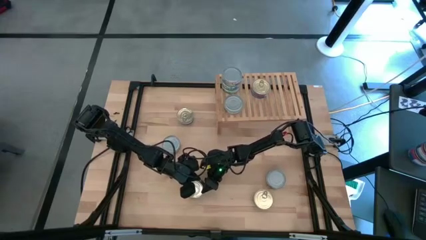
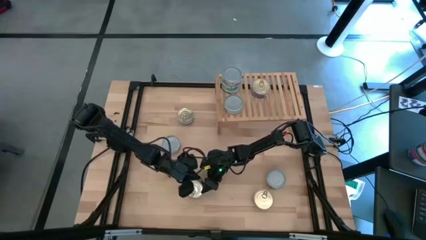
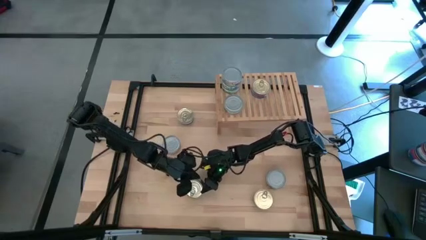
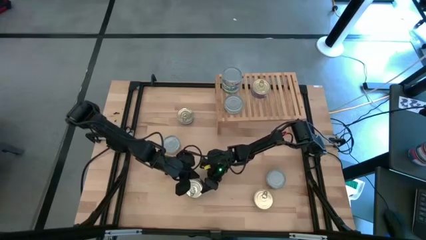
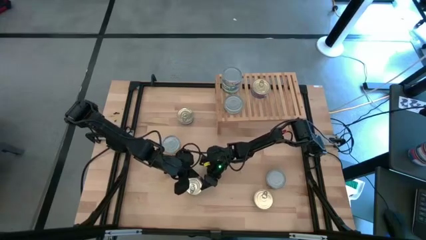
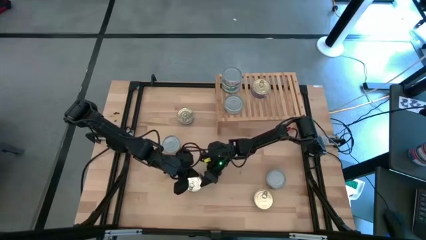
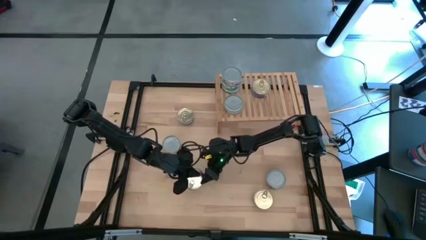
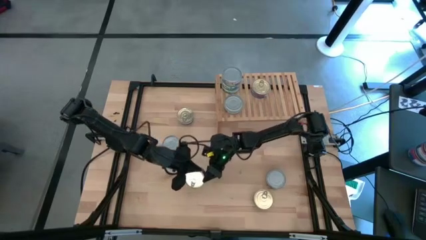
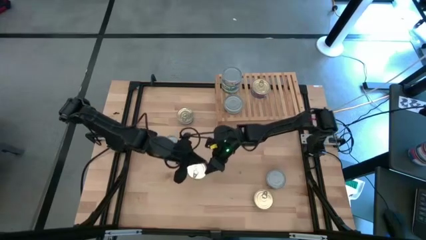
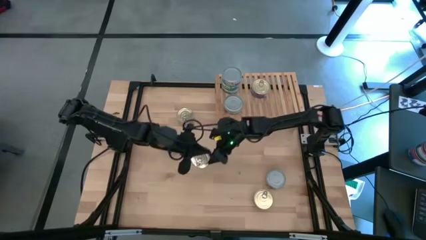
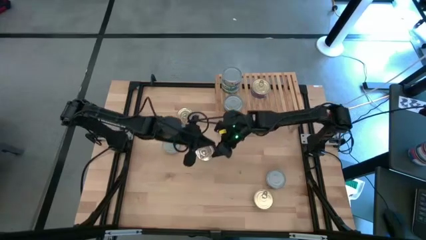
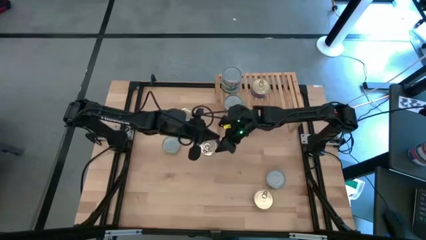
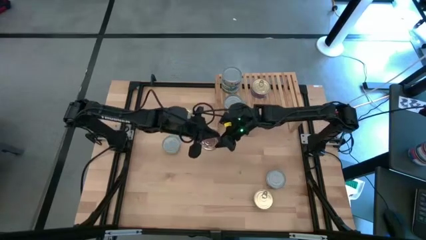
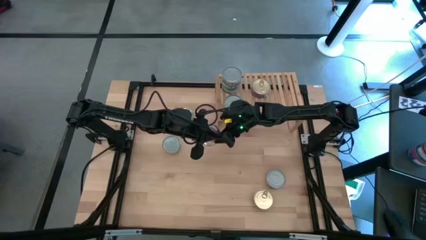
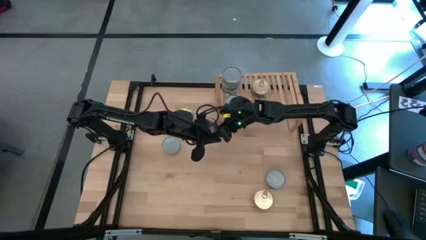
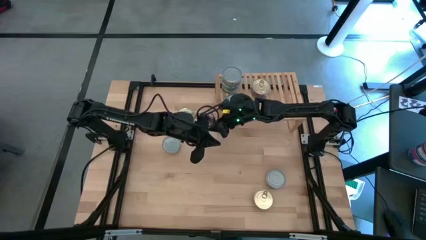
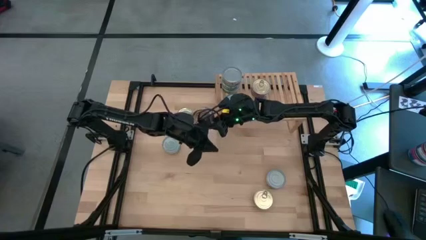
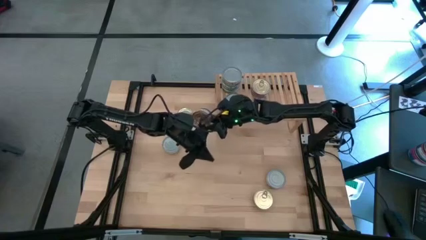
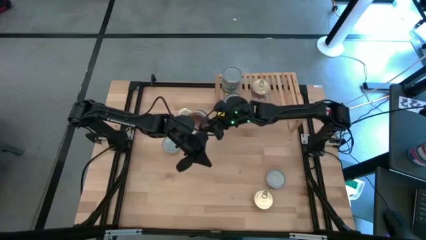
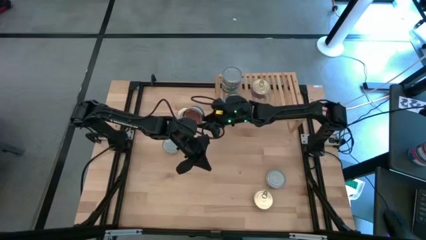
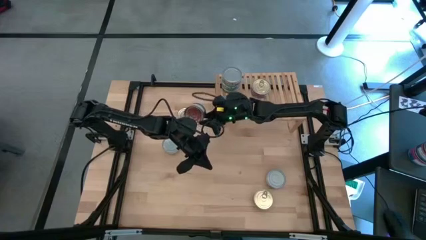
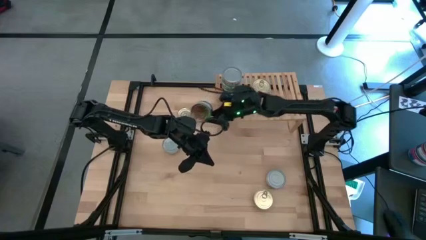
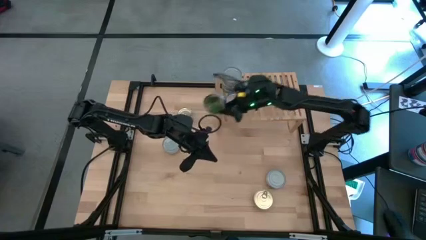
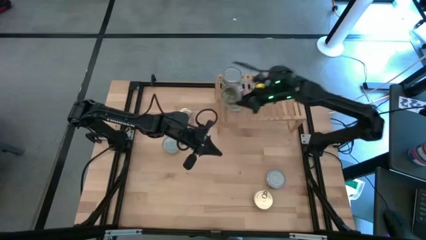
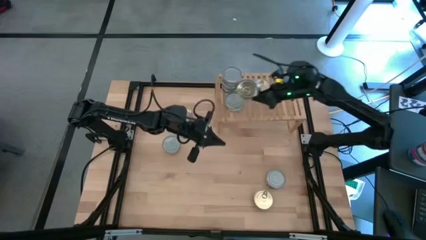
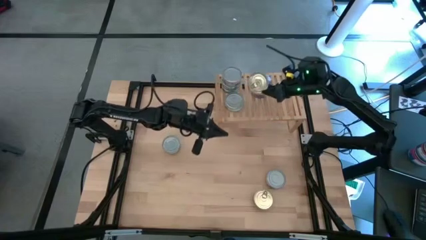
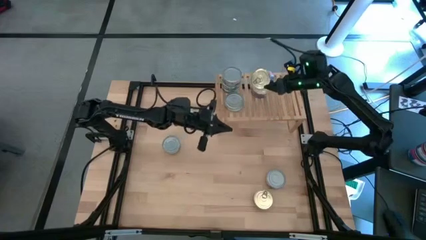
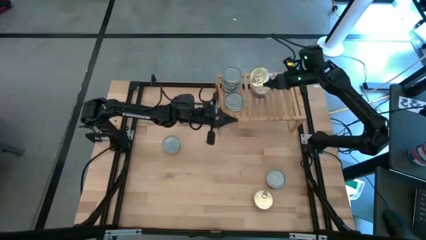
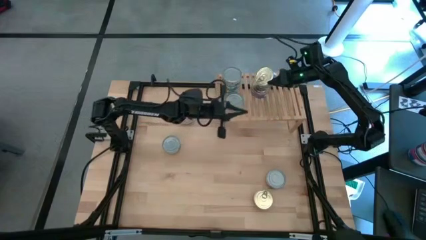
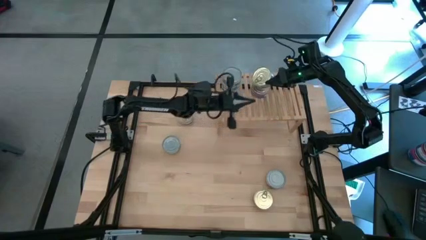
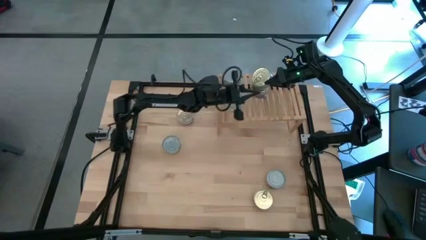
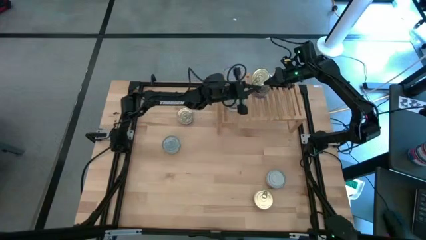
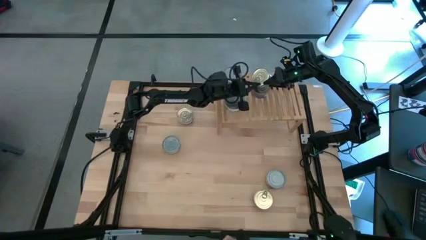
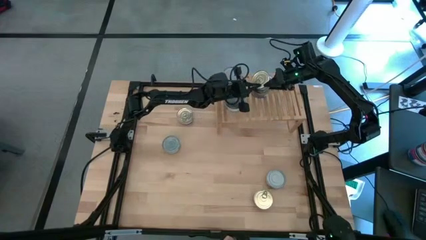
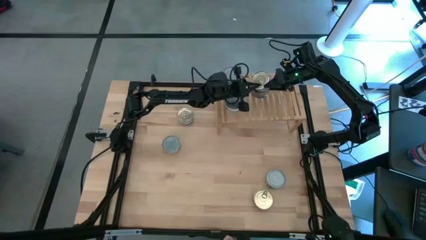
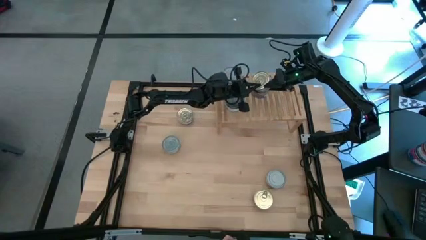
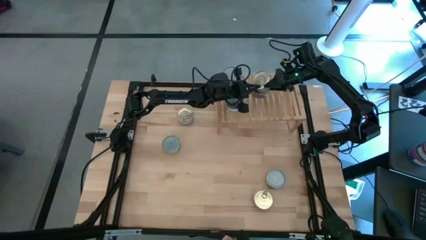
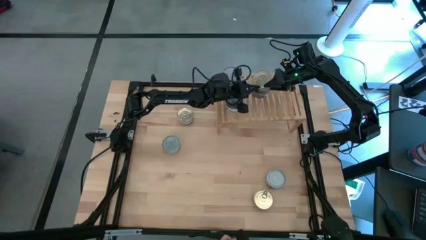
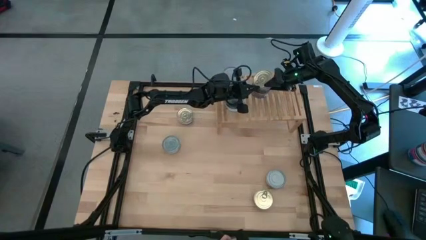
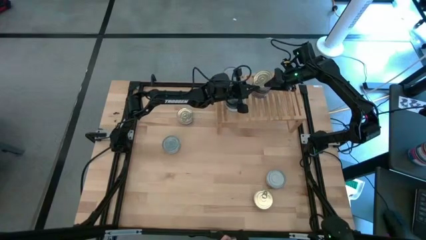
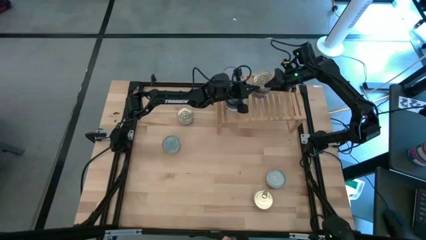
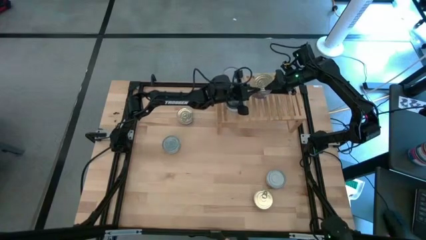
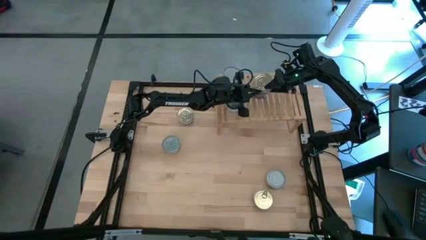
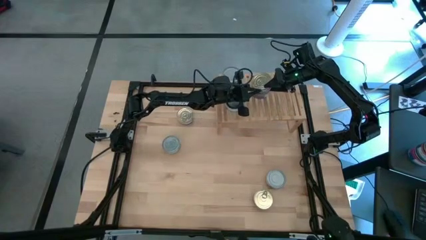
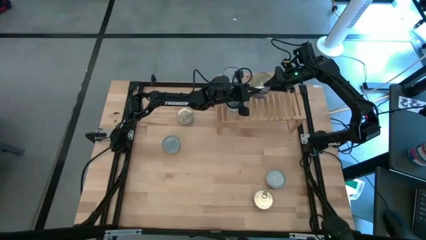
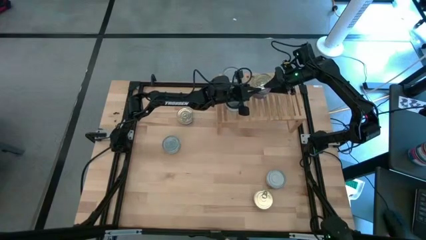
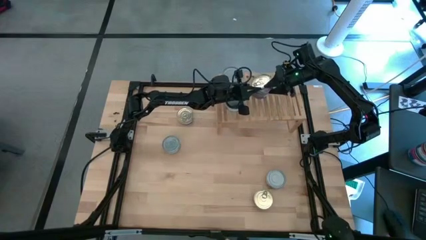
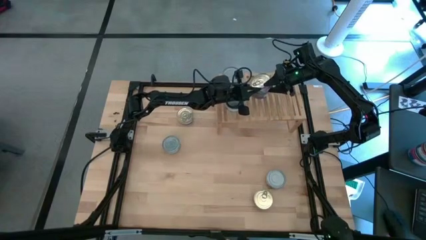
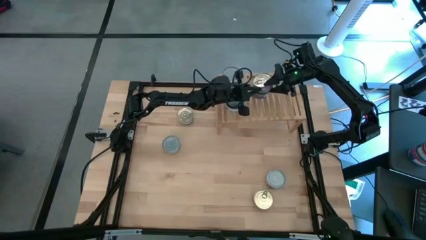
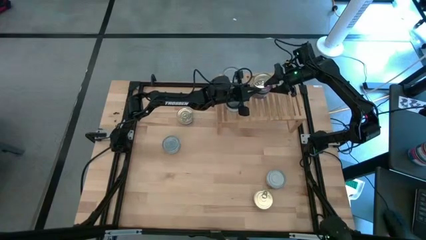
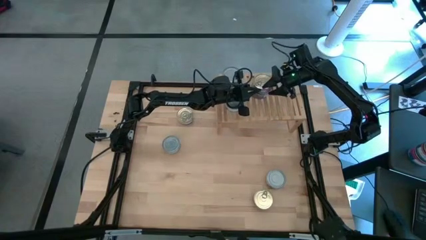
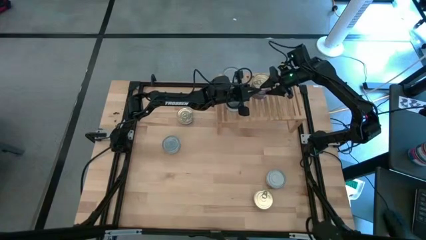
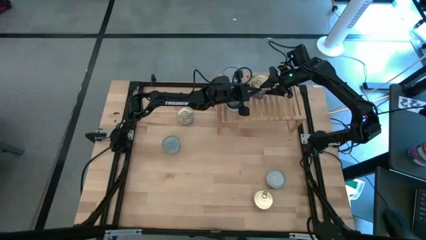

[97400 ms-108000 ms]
Task: Stack canned seafood by type on shelf
Stack the blue pink tuna can on top of the blue pink tuna can on the shelf

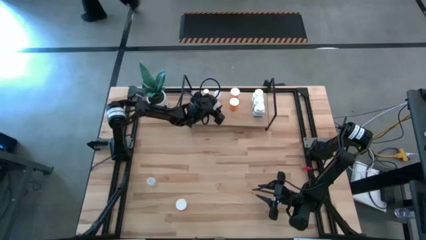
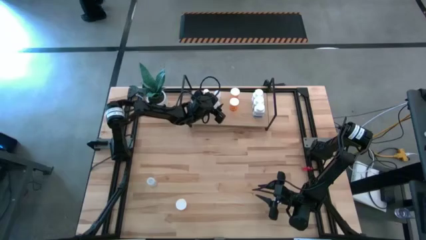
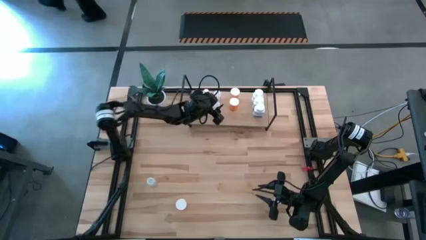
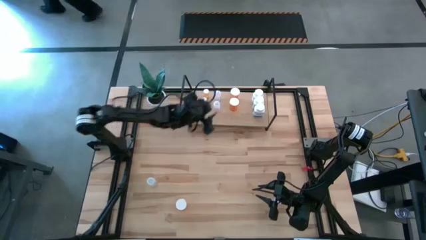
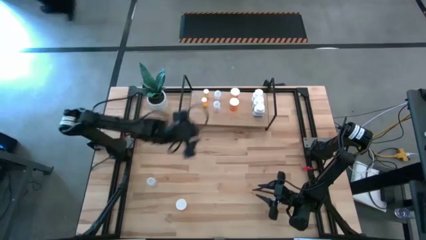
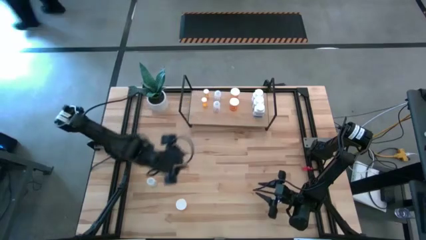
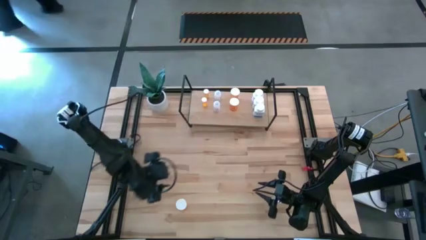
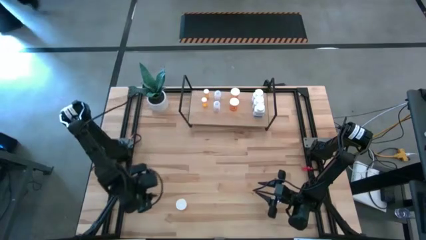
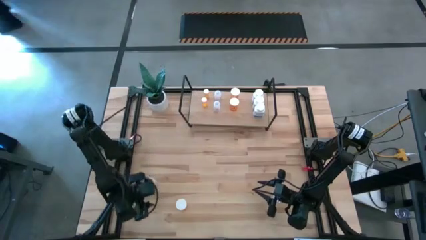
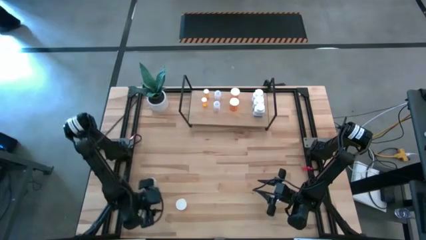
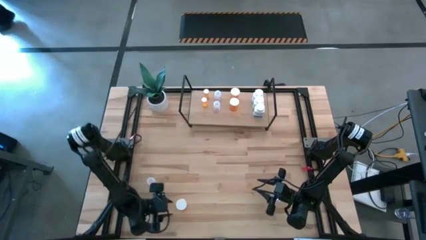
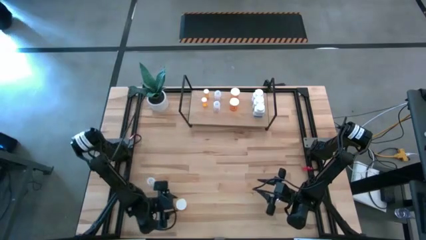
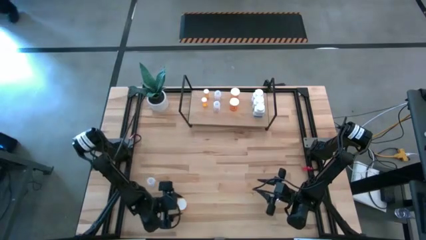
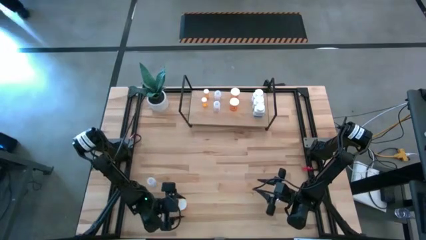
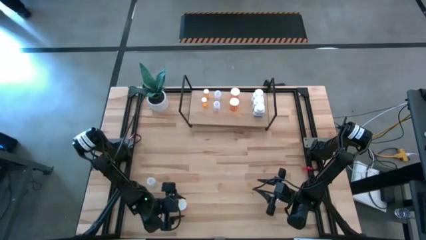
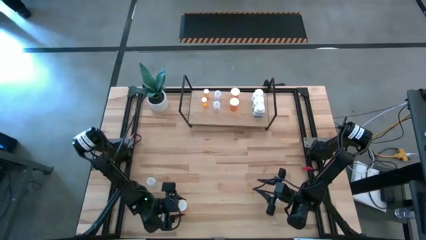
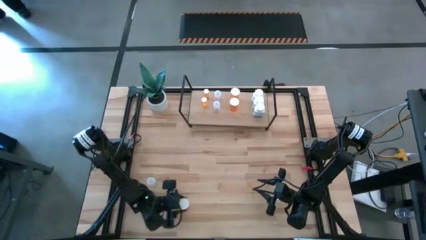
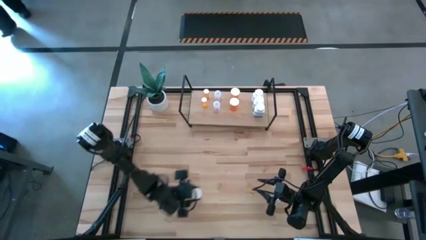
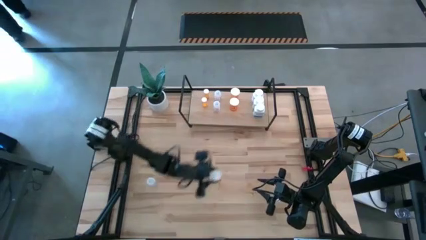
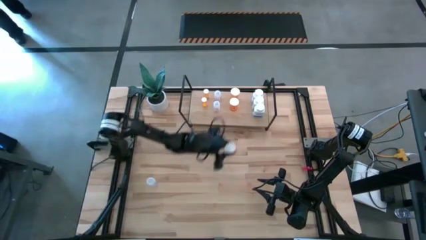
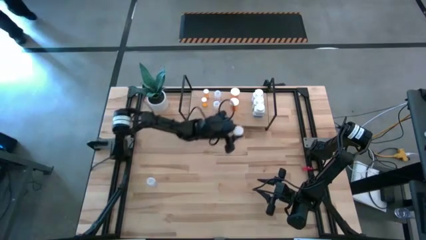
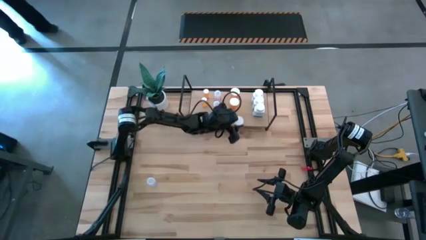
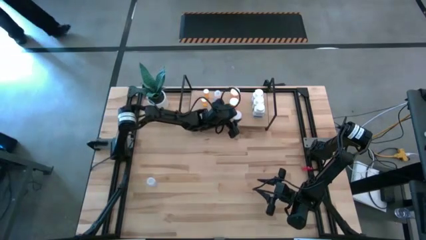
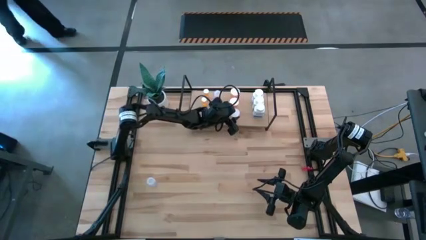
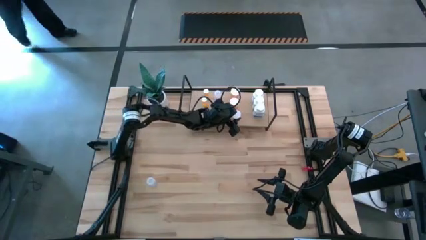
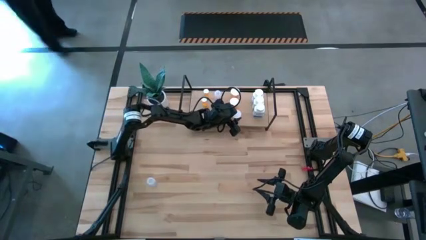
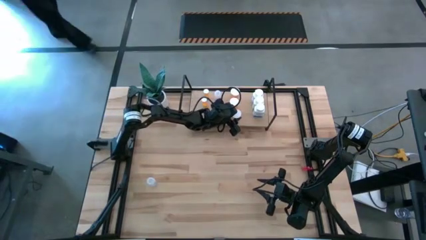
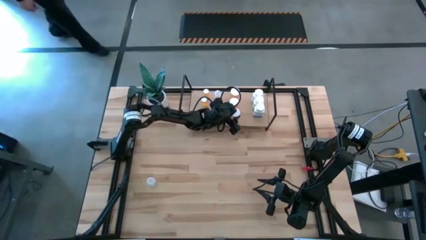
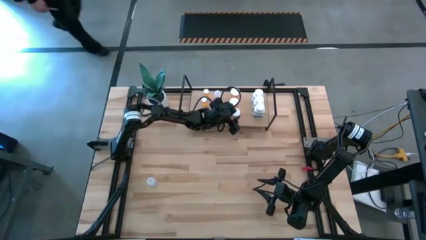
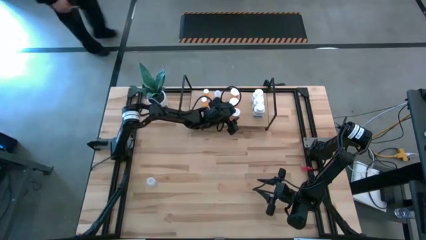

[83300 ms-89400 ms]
Task: Pick and place medicine bottles onto shelf by color
Put the large orange medicine bottle on the shelf aligned with the other large orange medicine bottles
